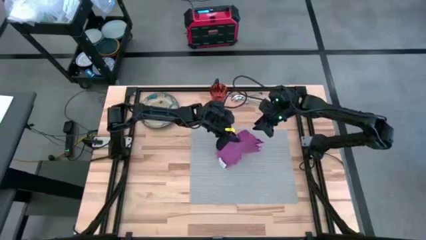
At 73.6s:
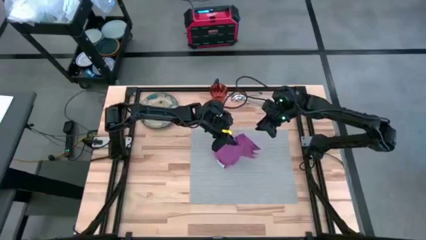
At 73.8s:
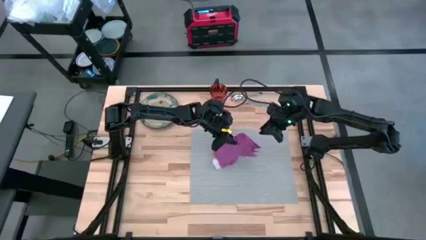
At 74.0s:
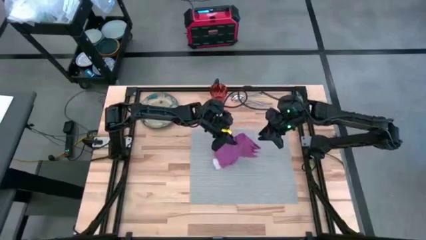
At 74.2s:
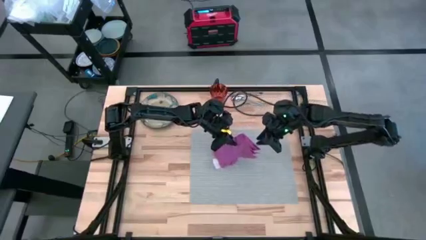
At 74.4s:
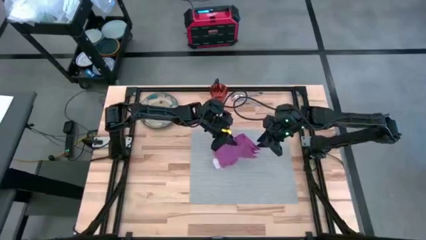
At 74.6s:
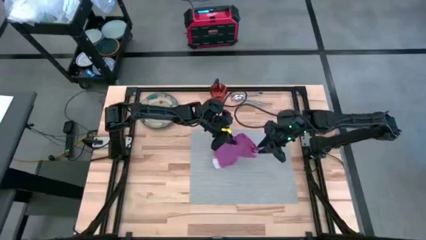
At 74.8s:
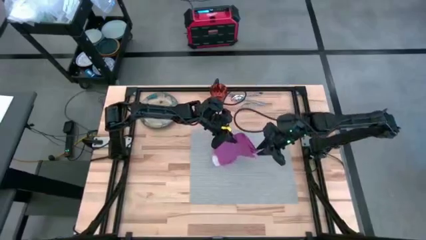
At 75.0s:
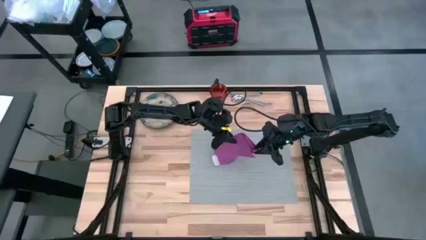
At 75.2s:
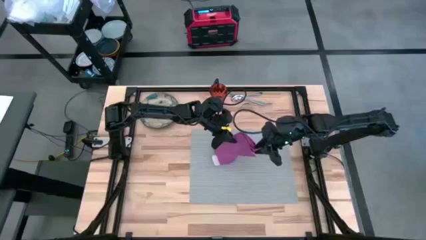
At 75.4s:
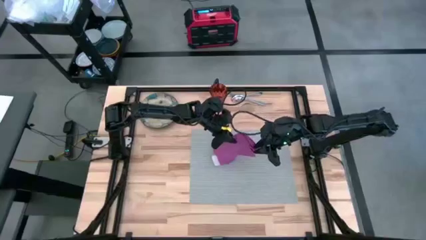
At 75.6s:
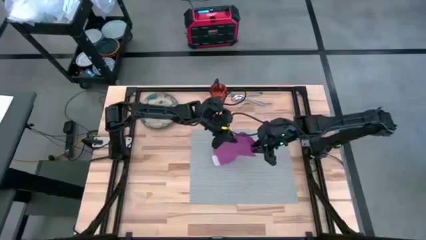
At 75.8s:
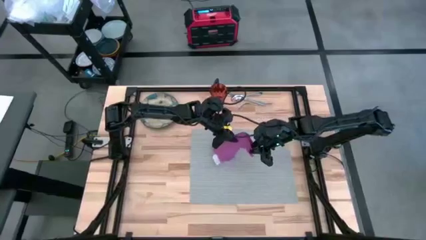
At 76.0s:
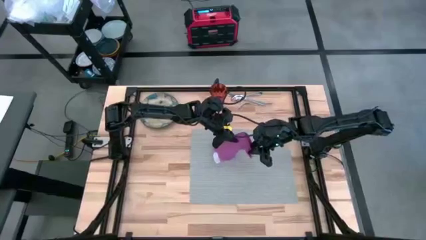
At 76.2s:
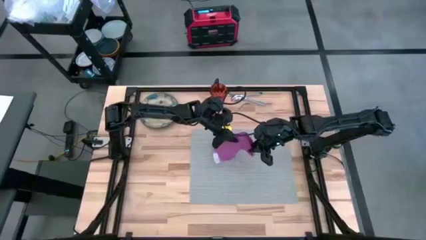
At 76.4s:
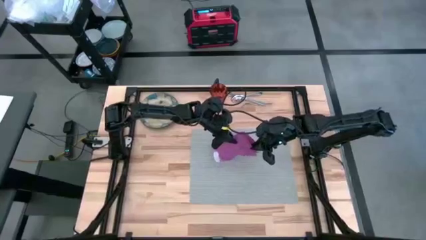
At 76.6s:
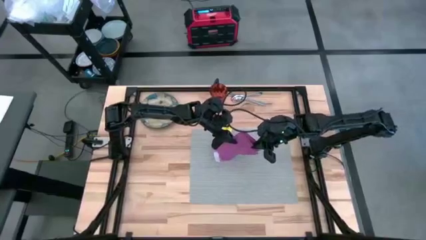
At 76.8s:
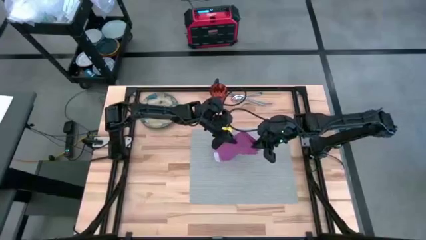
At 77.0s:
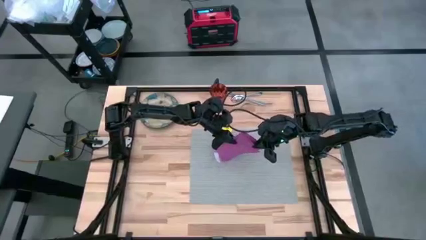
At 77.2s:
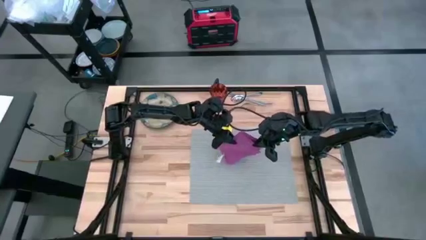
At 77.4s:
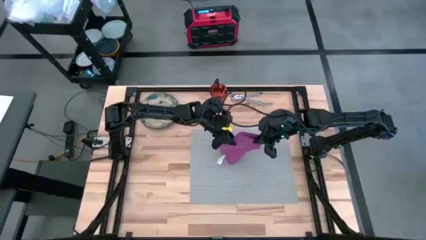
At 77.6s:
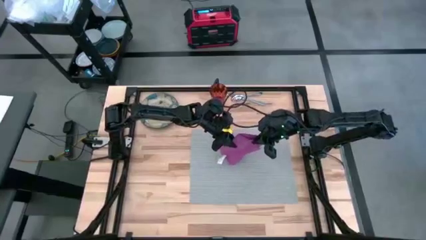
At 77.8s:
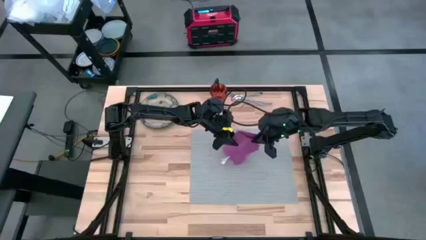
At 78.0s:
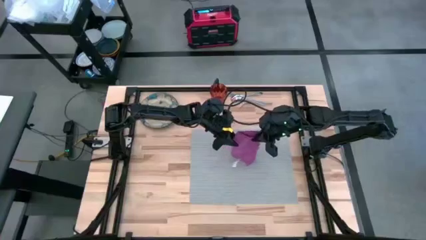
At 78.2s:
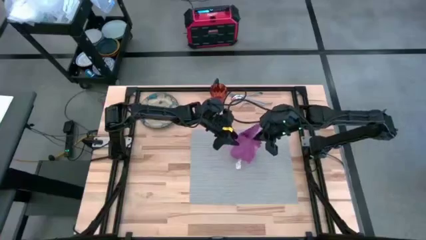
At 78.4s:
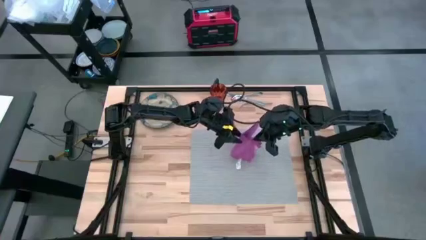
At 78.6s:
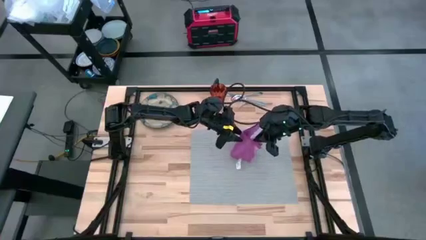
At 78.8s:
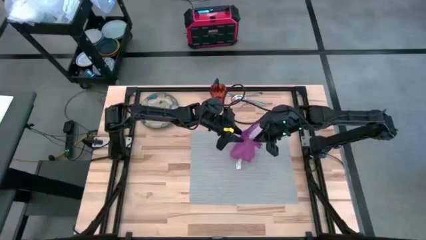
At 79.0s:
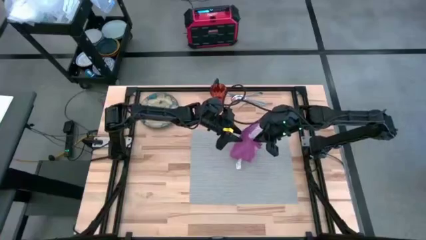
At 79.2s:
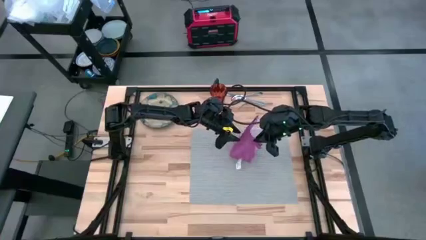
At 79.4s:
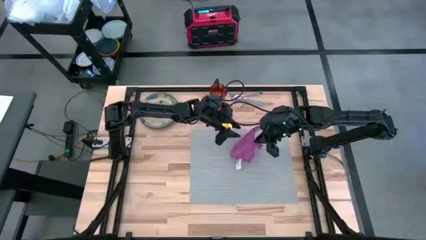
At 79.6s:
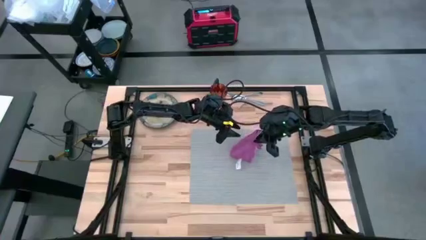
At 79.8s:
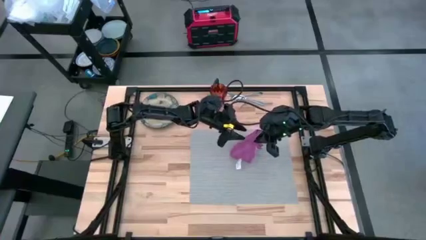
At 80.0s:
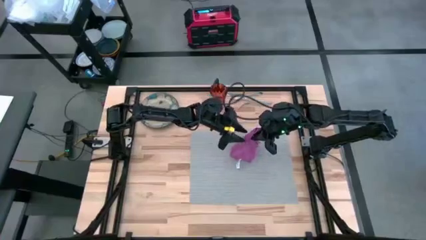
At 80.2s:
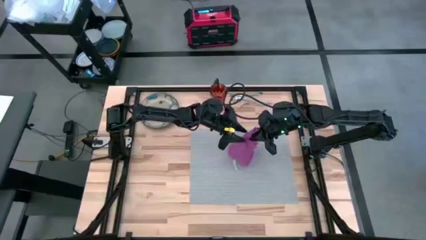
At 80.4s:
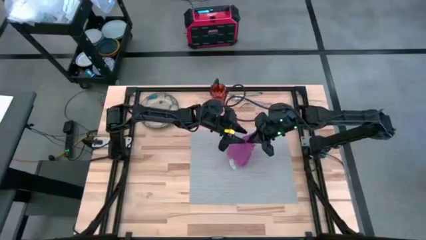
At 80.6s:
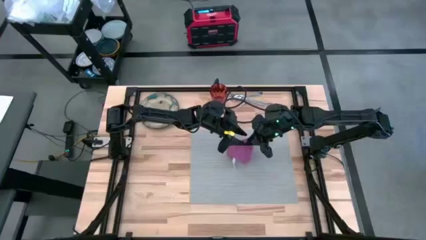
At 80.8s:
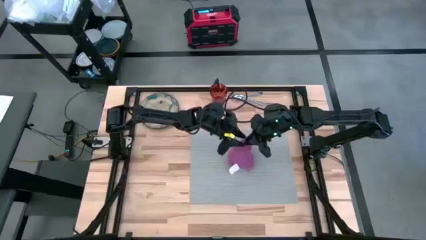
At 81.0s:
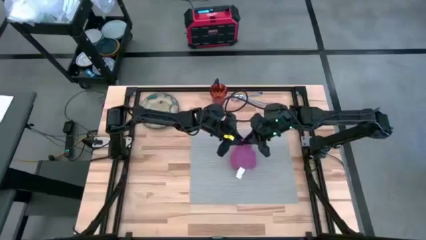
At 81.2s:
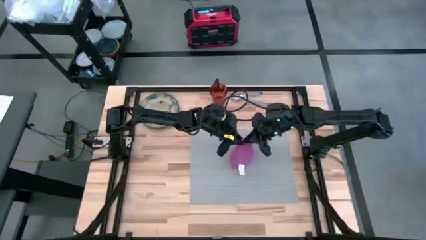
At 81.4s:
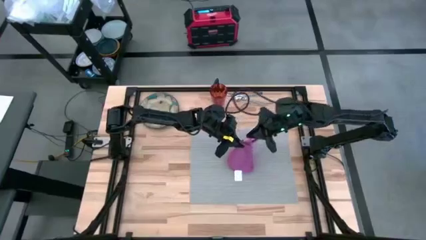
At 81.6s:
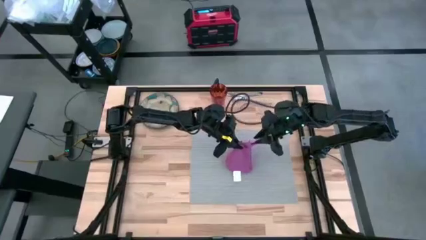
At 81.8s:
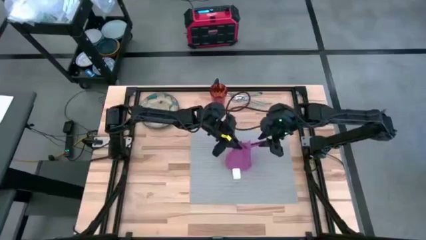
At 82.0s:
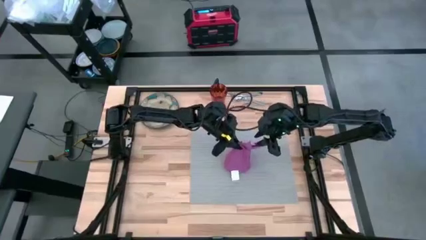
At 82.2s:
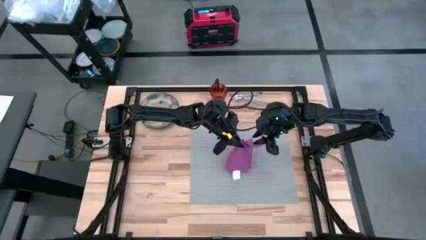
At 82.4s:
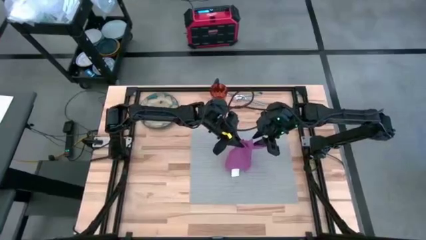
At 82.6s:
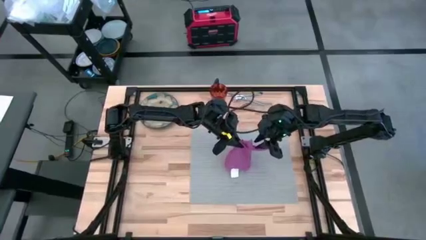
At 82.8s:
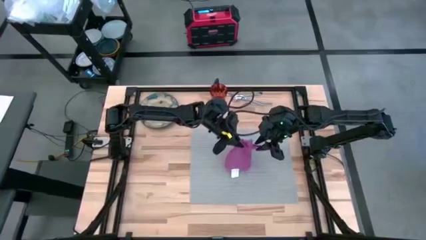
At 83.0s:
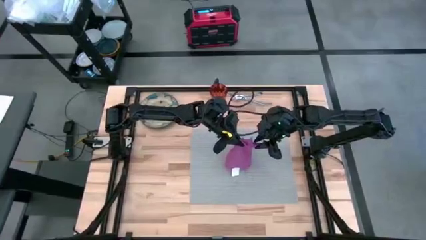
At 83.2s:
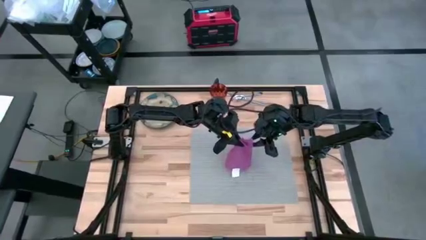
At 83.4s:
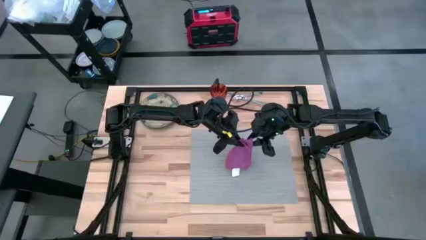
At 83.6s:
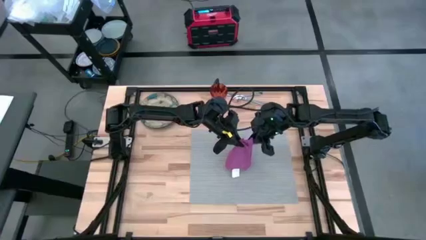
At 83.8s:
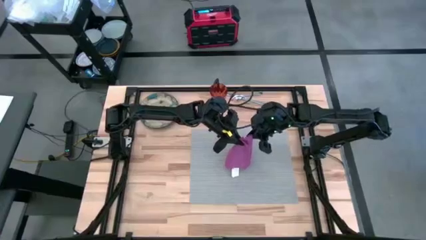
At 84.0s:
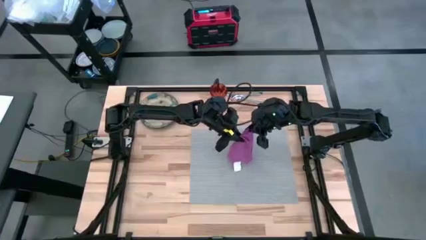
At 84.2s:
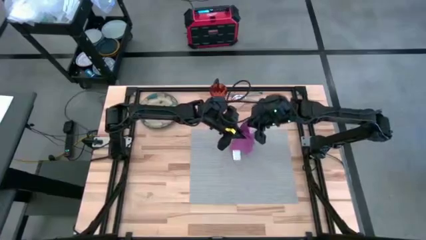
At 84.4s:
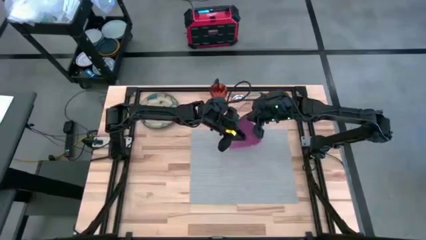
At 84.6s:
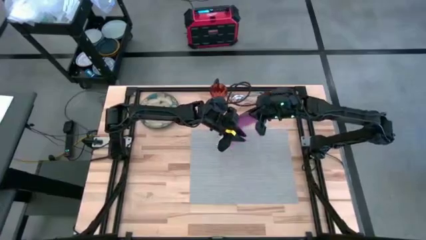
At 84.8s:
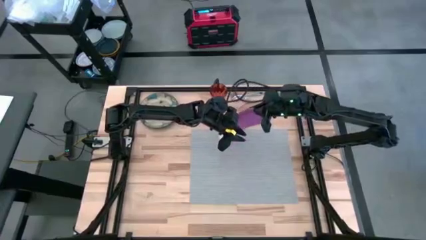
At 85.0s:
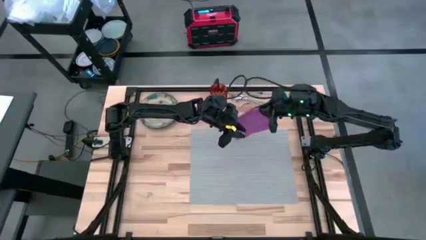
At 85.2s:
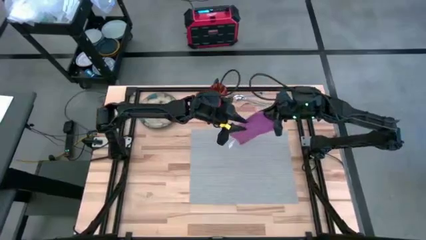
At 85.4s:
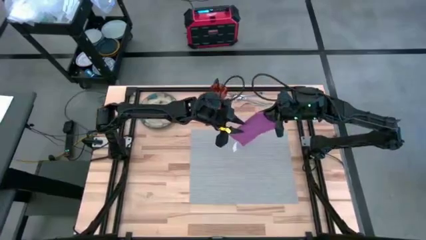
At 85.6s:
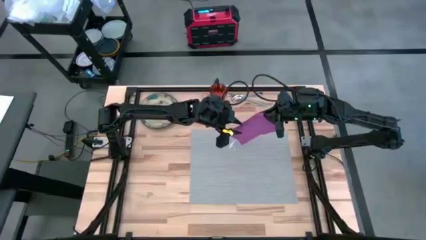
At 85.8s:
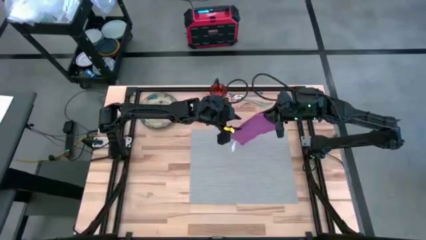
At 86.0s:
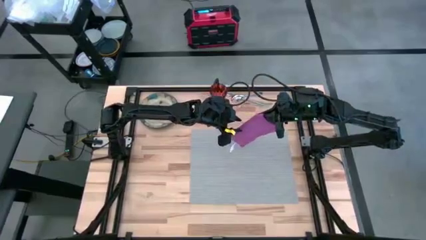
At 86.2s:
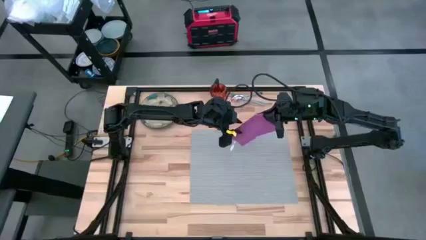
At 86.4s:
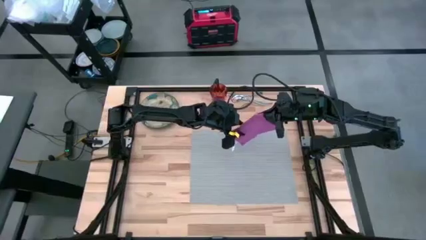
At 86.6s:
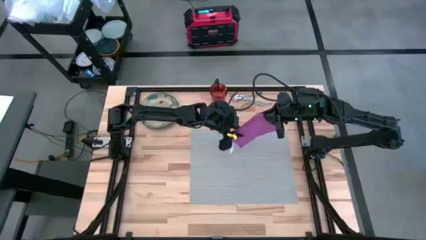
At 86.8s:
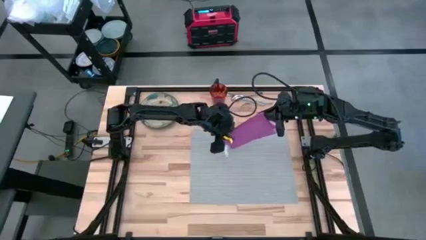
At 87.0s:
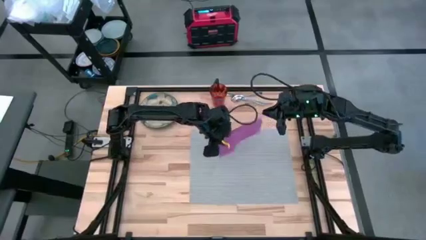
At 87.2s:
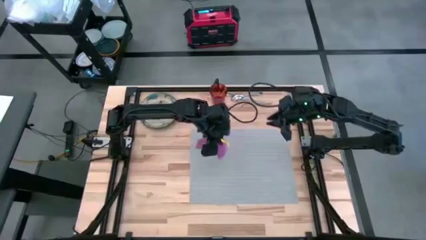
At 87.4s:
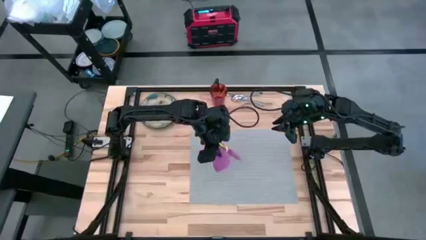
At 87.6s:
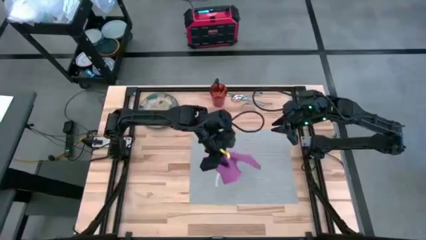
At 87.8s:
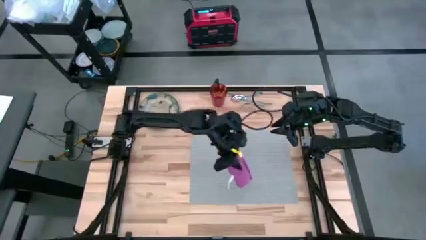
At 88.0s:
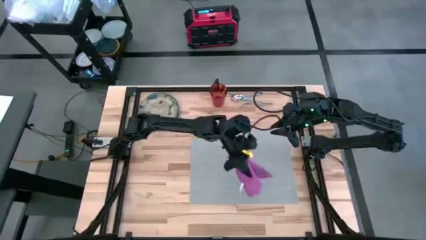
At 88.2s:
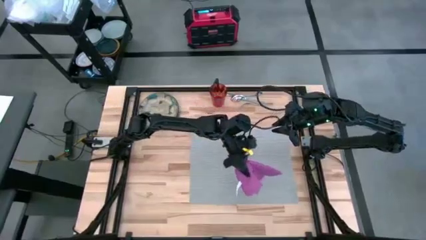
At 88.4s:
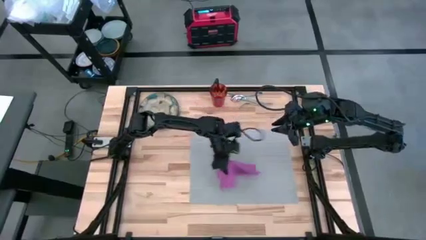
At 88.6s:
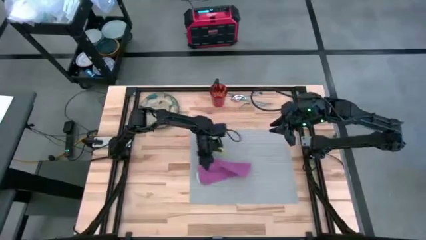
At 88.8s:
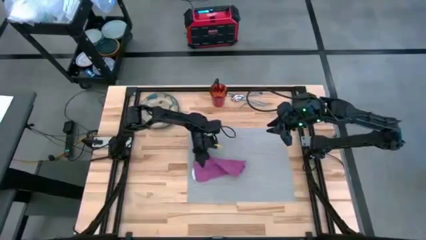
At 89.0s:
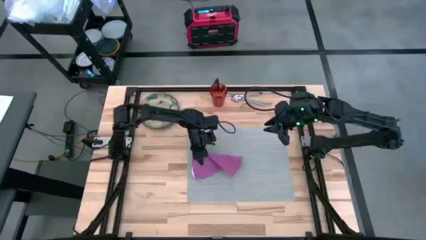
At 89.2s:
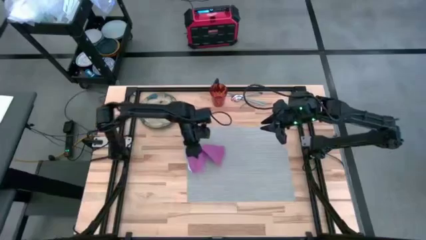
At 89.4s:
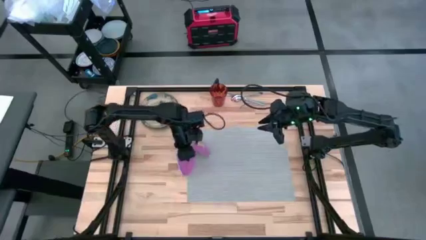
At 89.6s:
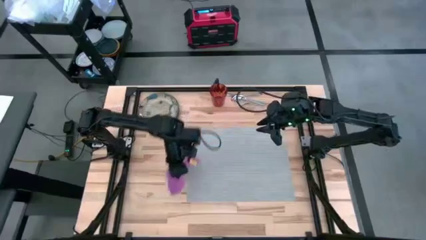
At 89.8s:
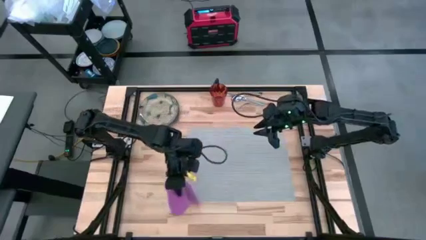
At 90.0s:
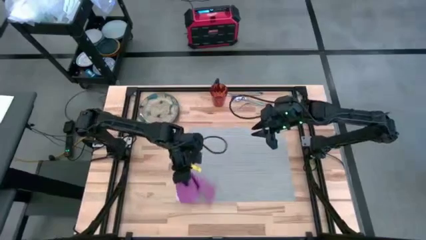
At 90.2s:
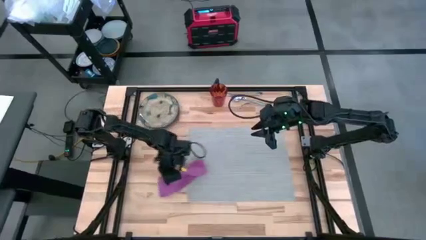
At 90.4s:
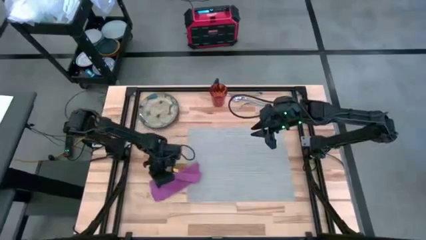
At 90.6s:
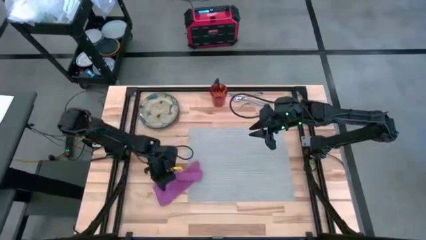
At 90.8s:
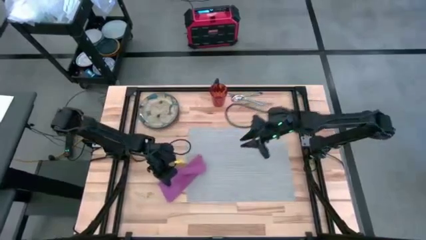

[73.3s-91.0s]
Task: Set table place
Fold the pink table napkin
